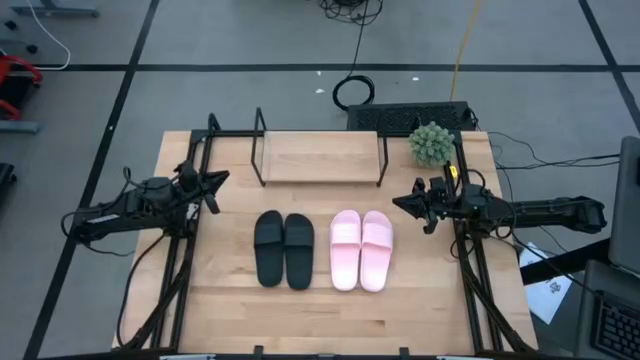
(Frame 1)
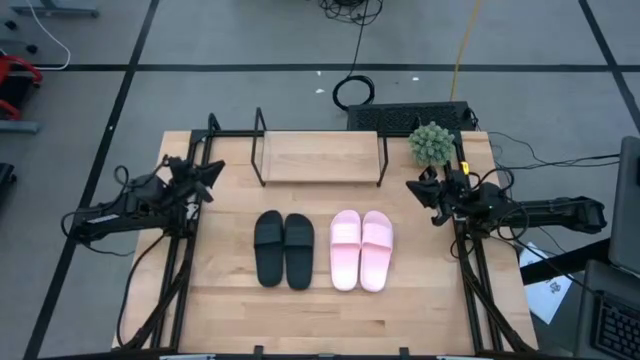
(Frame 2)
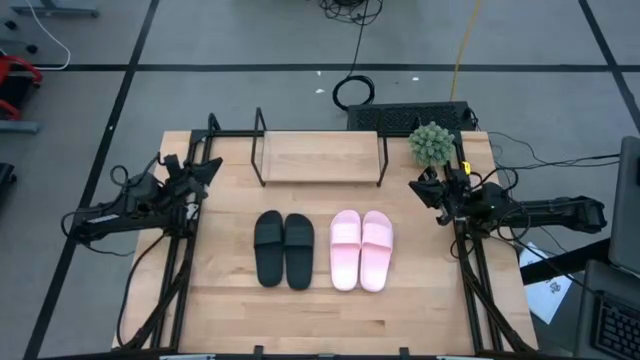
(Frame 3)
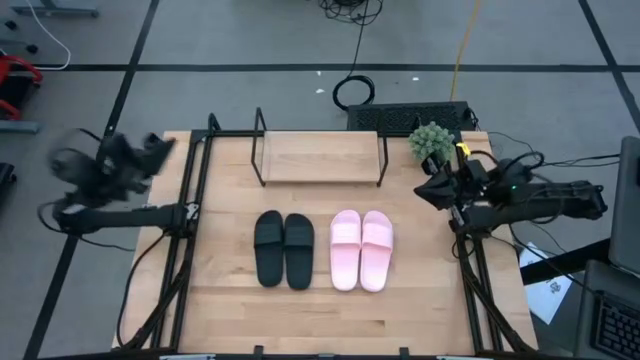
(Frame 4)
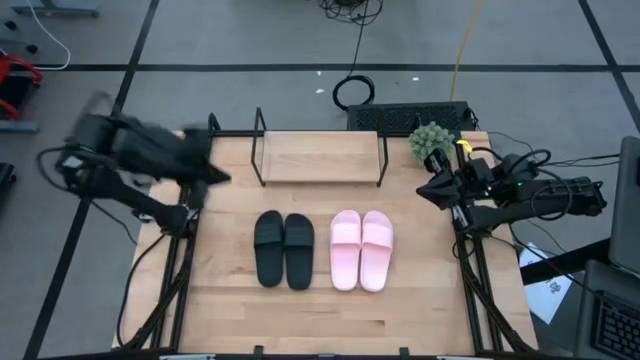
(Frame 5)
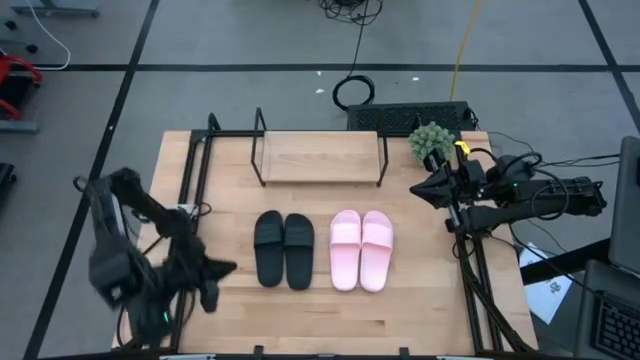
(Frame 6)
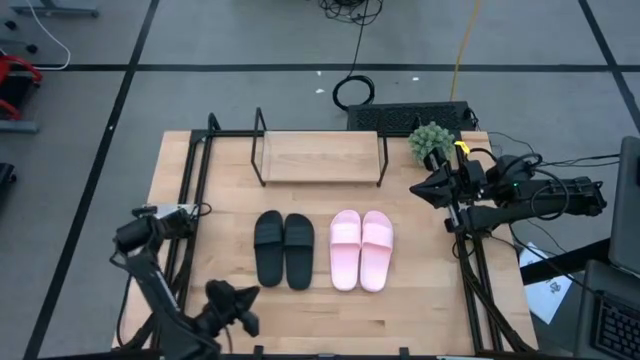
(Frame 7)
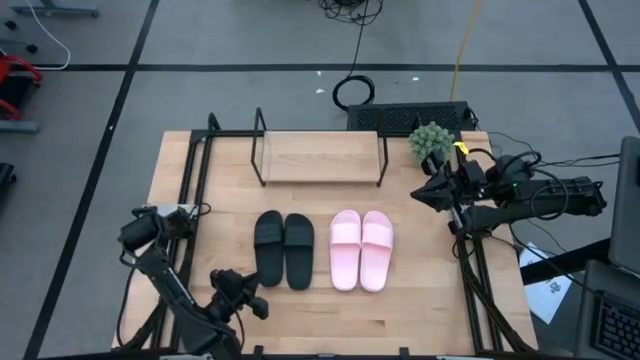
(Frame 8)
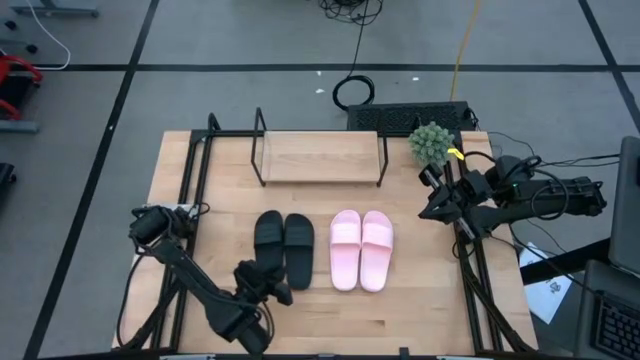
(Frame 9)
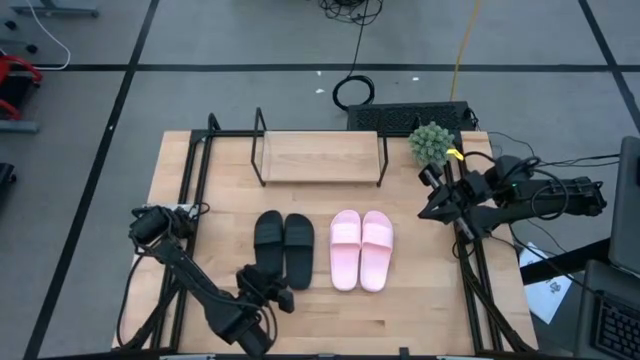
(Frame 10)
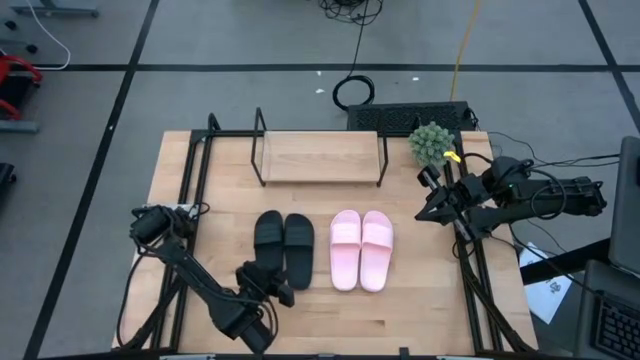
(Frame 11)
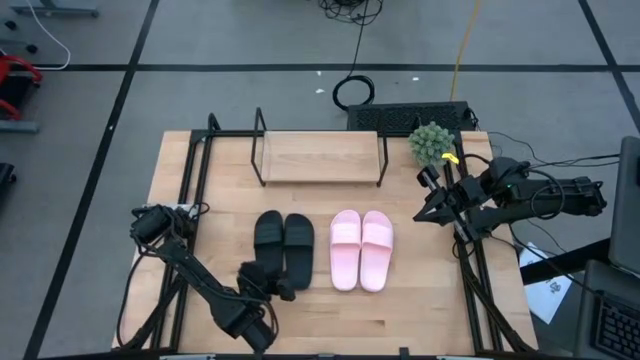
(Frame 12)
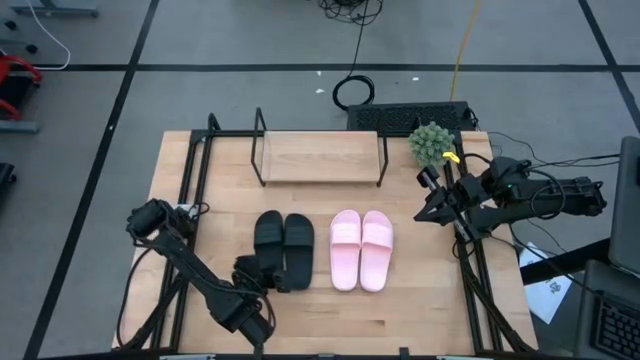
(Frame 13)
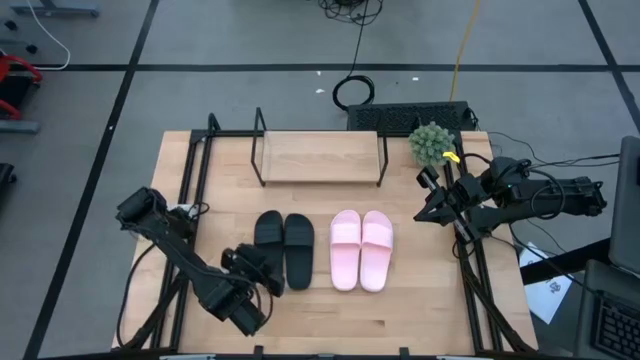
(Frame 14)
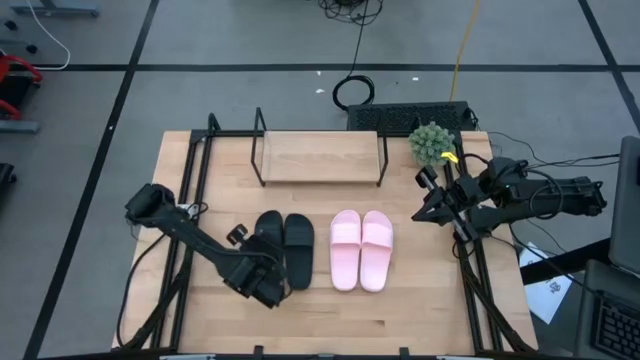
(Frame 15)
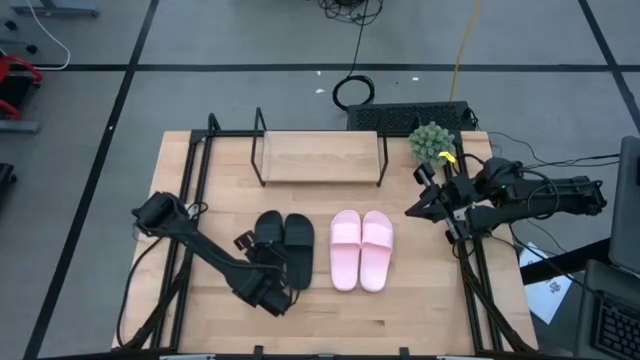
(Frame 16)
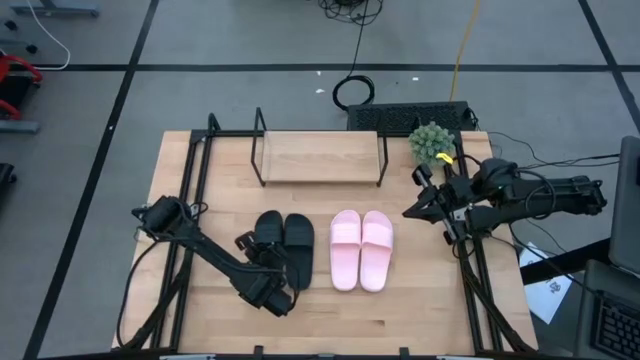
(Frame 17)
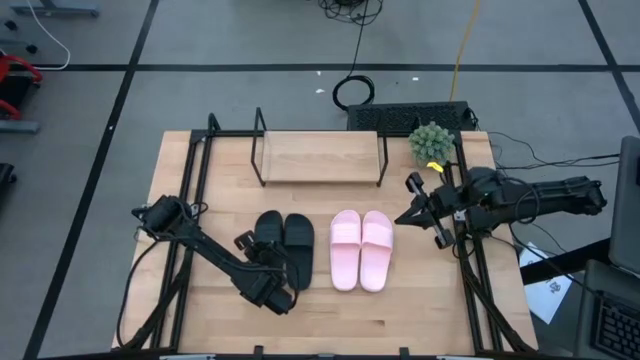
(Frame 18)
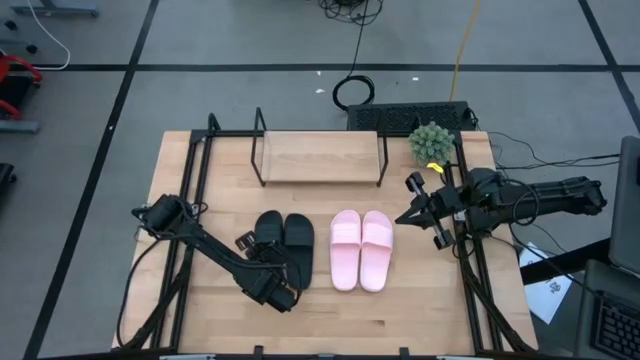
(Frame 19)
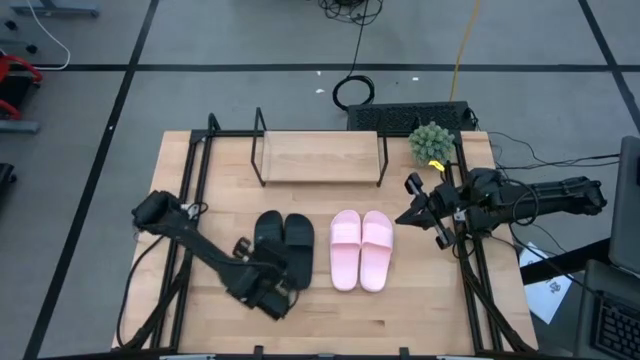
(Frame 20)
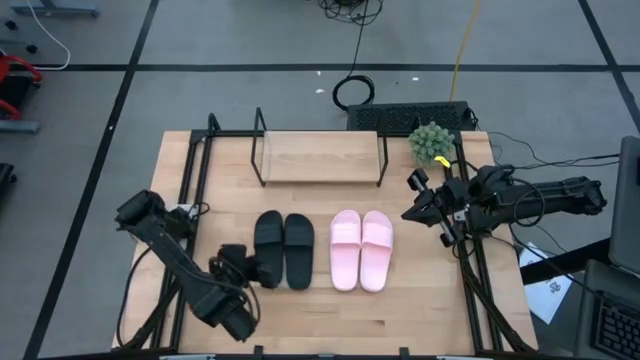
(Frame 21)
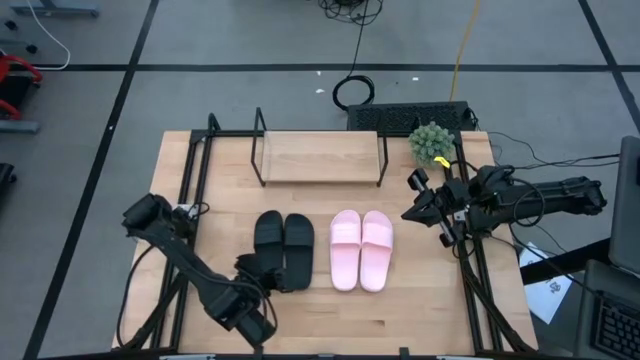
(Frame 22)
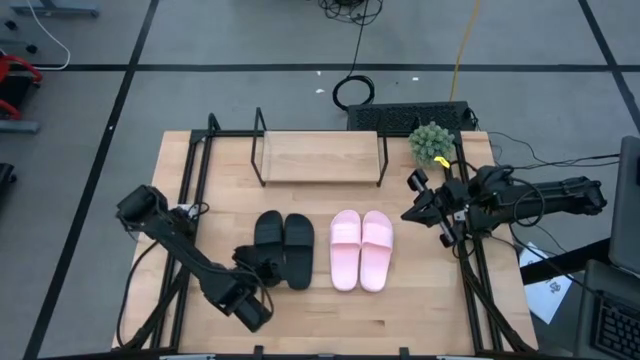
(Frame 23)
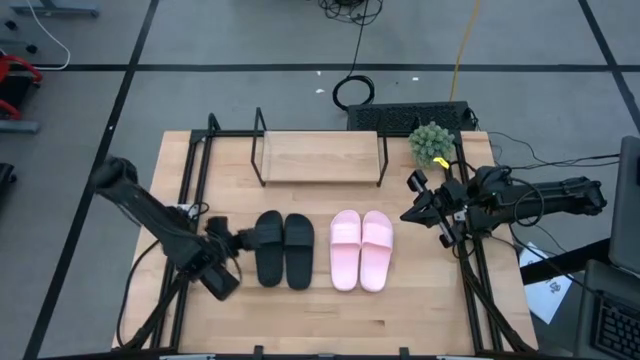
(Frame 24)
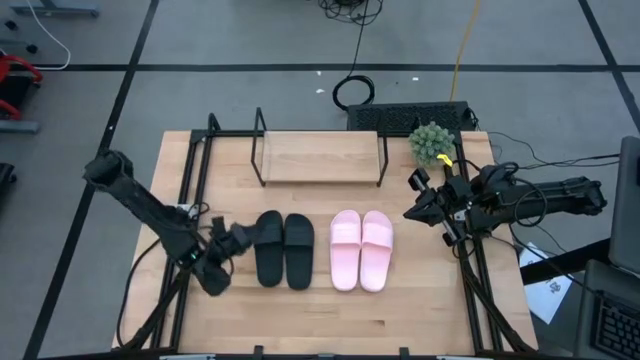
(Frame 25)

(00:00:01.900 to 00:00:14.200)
Task: Pick and place slides into the shelf
Put the left black slide on the shelf

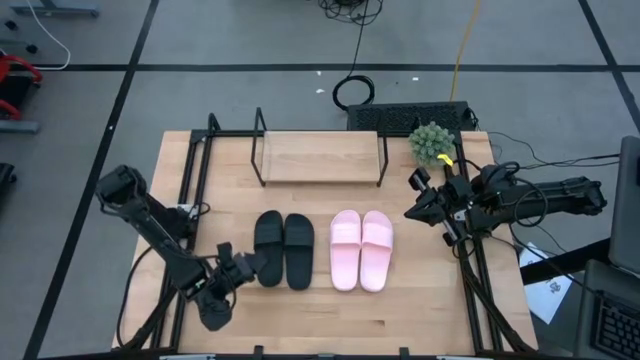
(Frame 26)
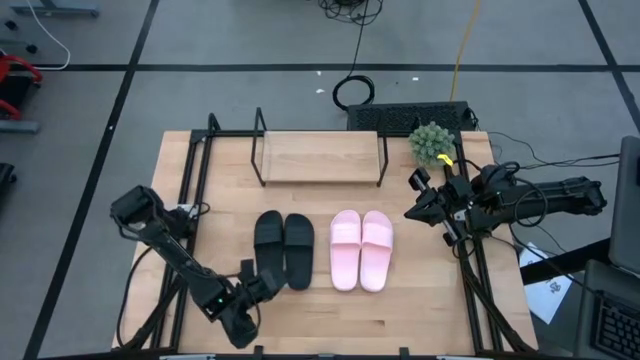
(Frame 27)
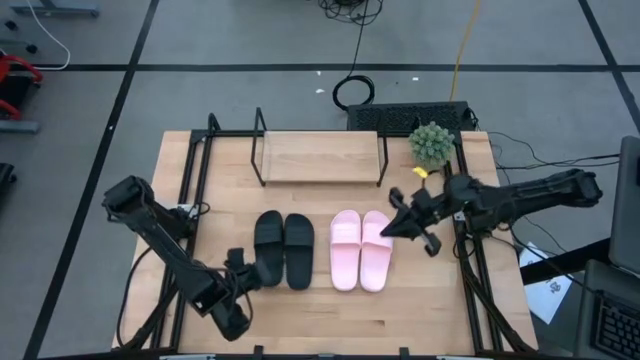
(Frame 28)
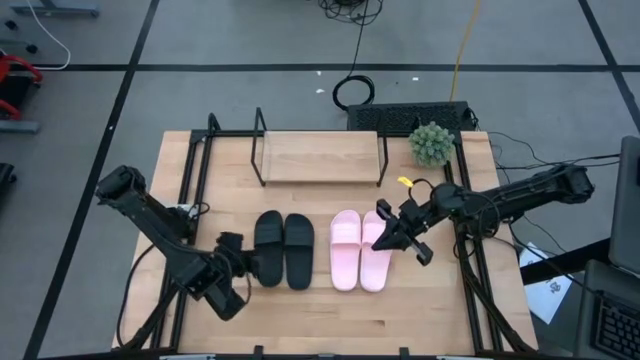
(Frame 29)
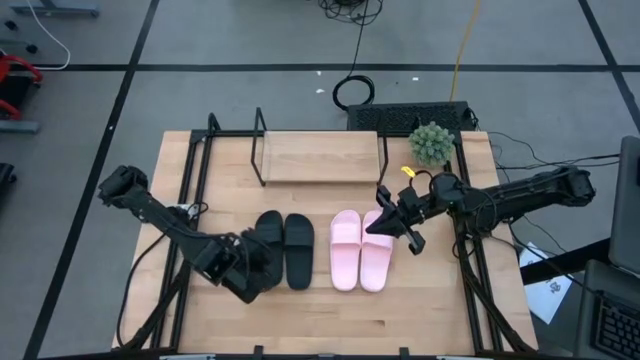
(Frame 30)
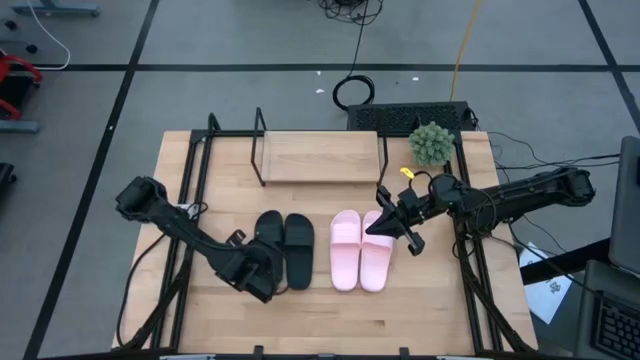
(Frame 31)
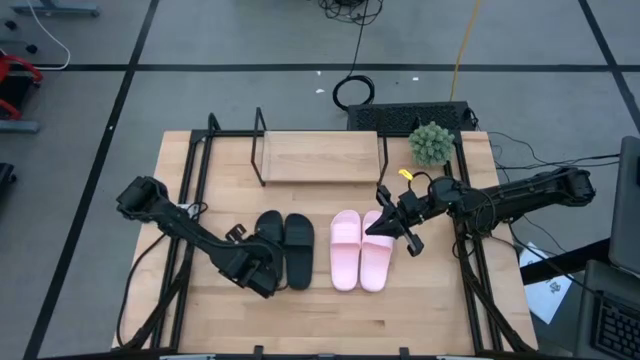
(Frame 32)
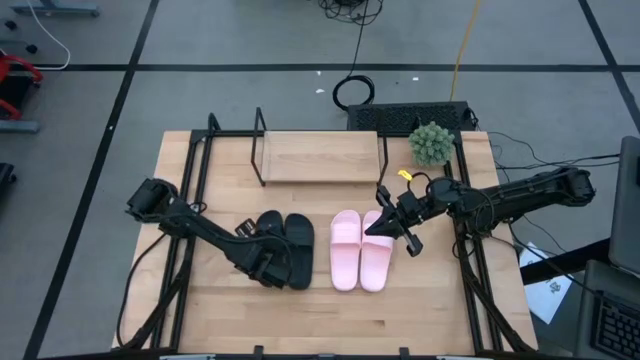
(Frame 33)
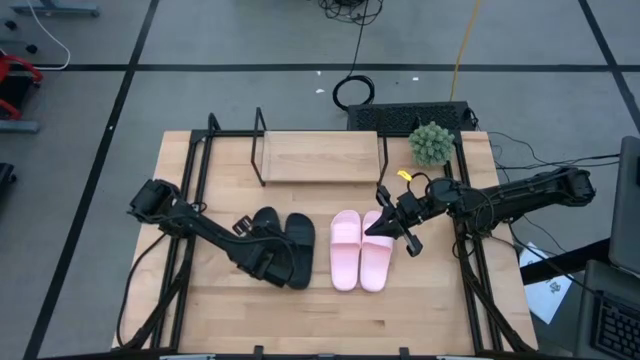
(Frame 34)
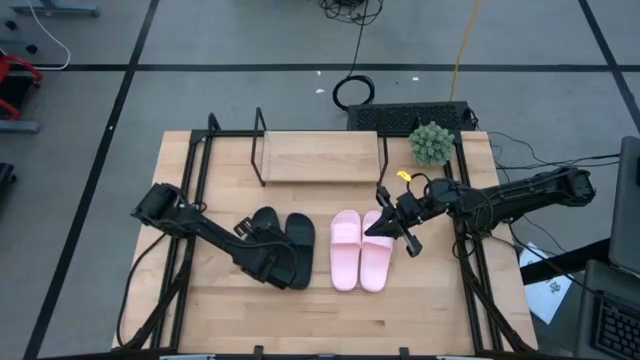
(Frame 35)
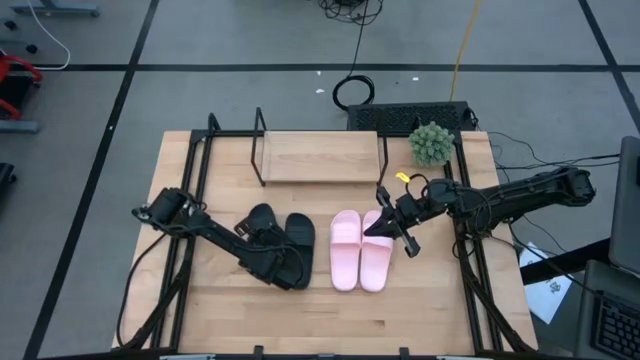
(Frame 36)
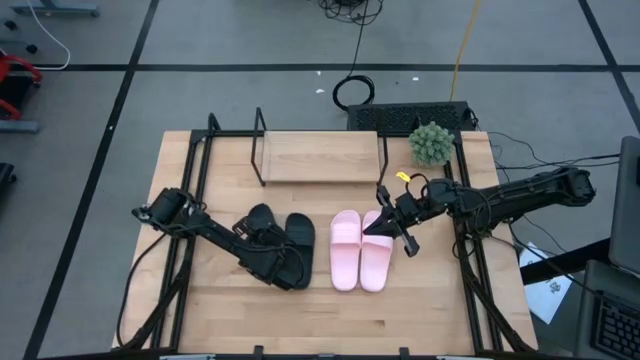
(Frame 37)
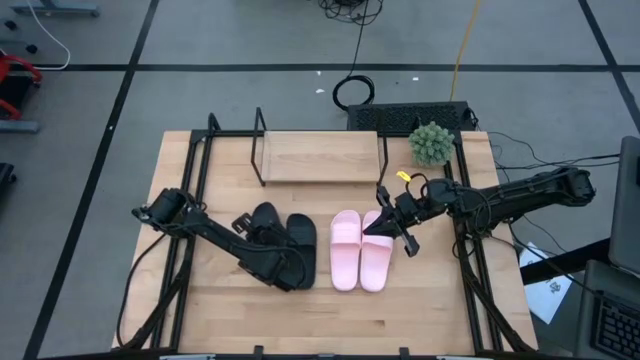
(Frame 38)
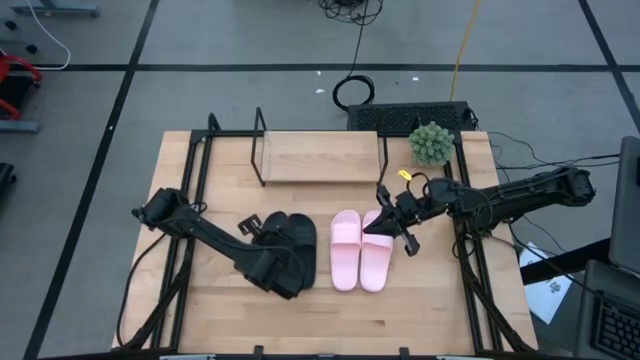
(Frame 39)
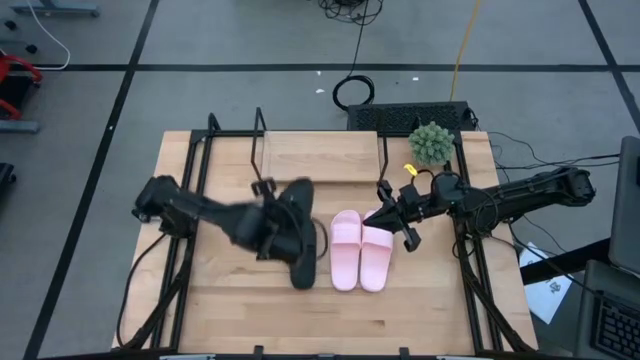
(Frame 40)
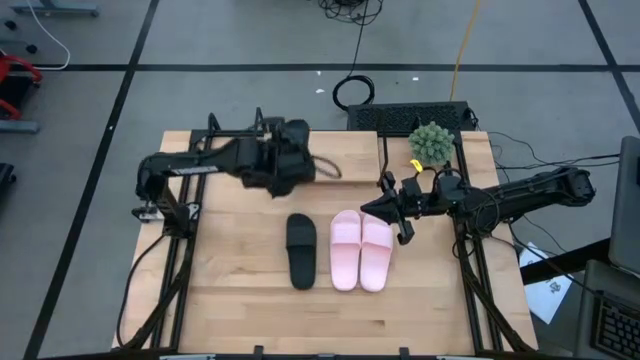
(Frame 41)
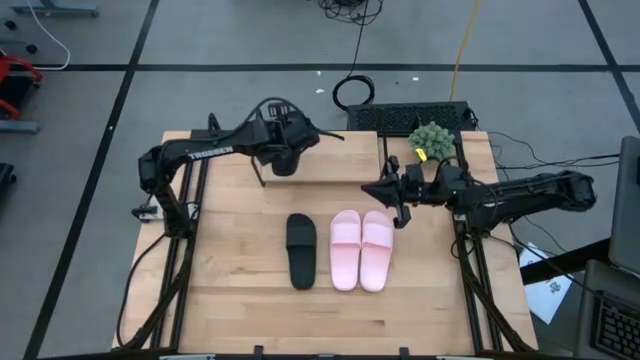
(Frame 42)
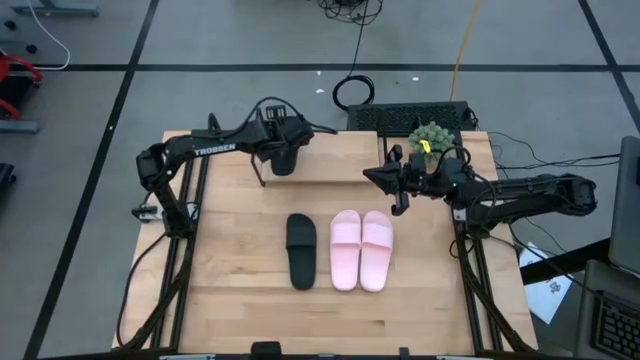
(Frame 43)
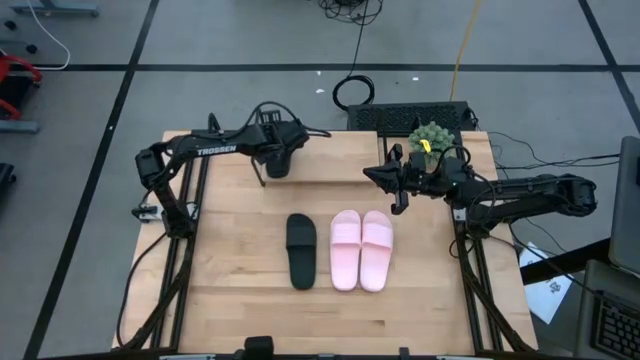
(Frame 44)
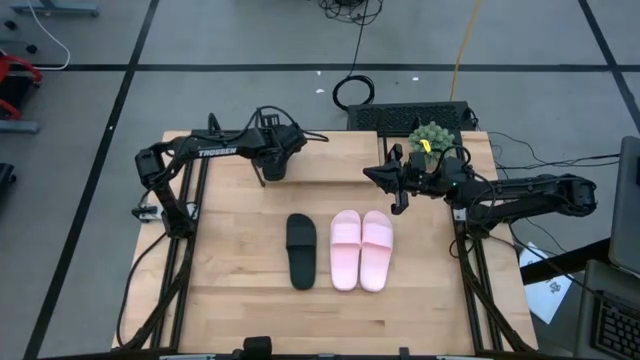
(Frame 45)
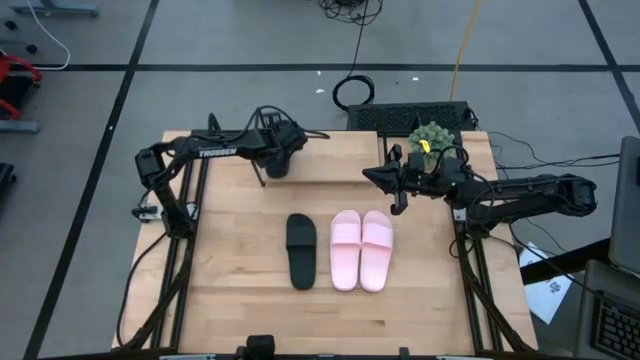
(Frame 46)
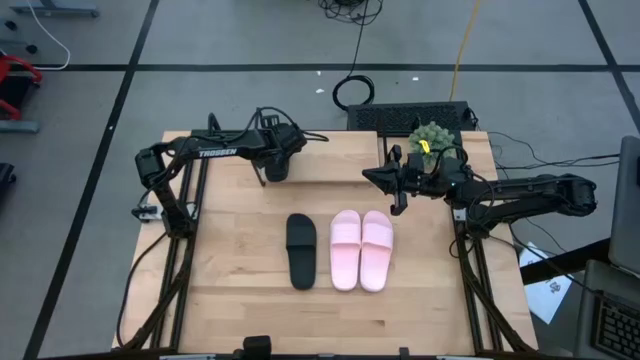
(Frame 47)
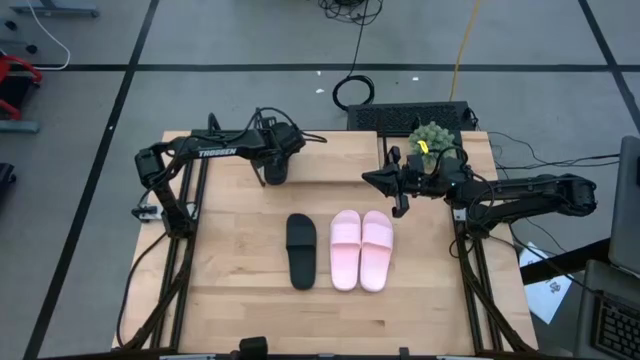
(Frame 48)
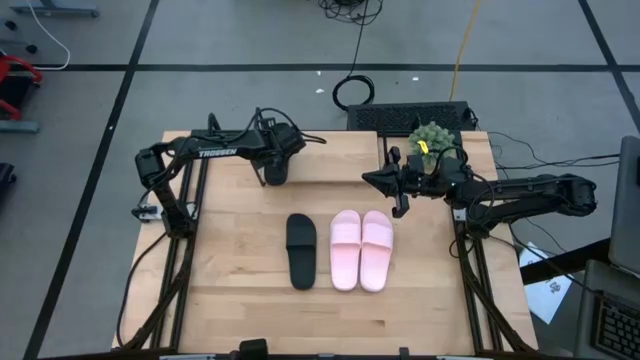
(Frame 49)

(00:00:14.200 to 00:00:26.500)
Put the left black slide on the shelf
